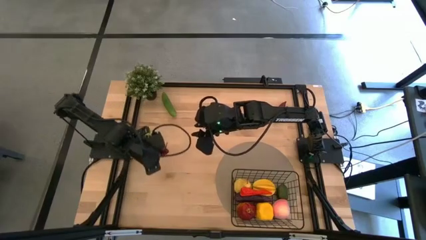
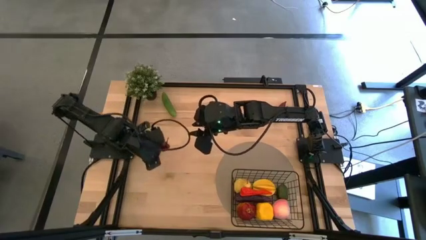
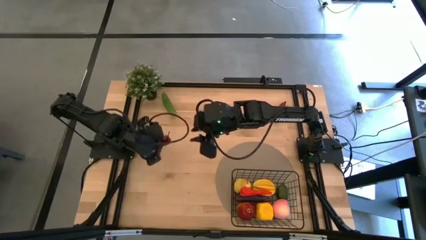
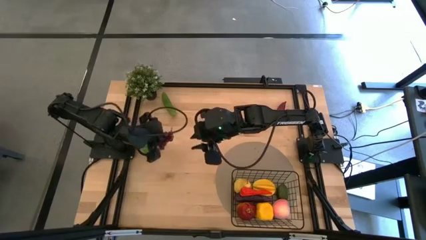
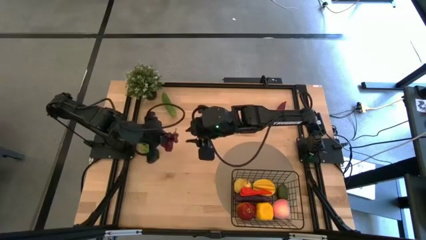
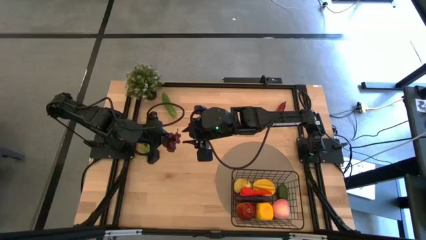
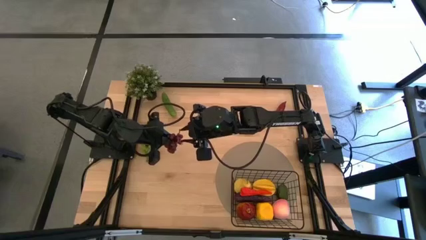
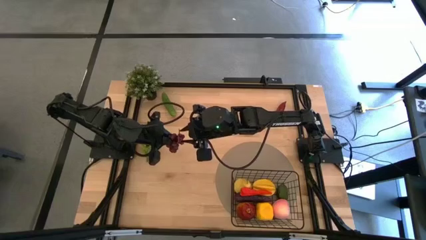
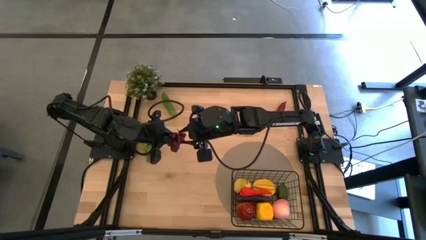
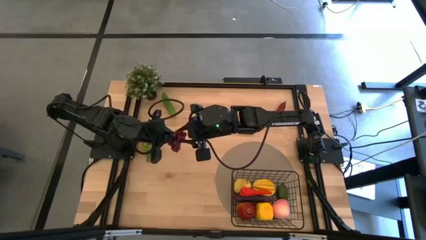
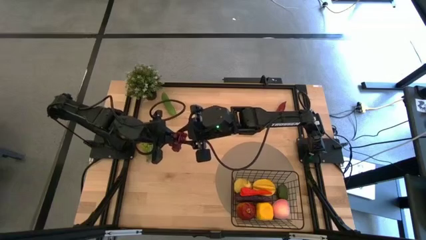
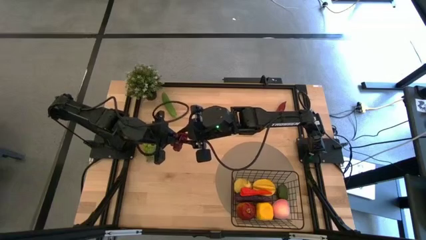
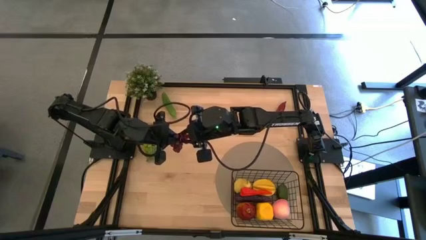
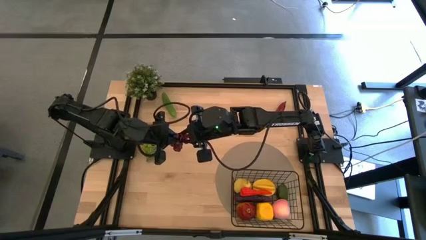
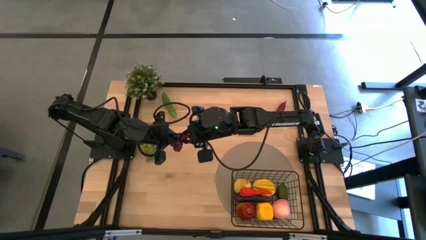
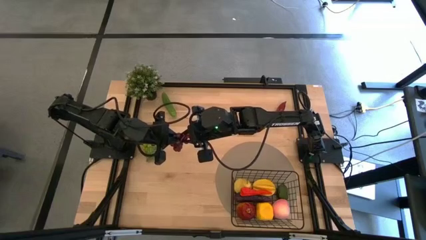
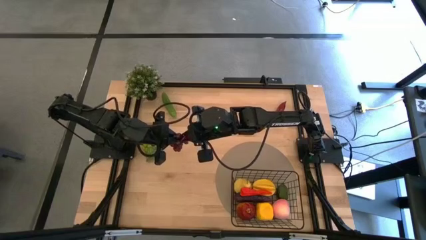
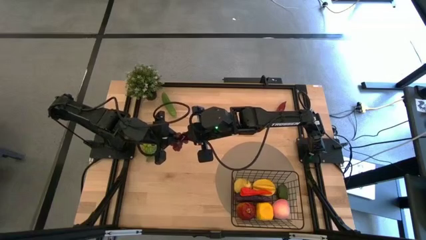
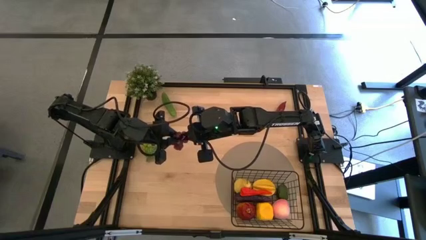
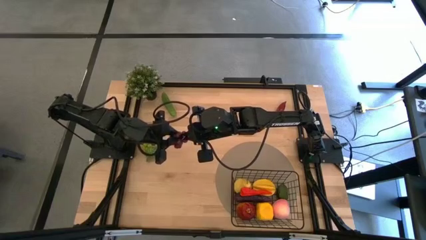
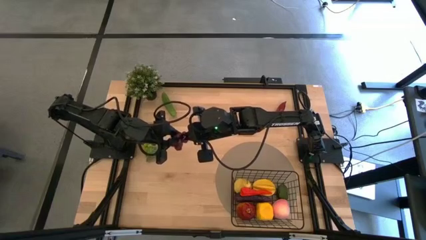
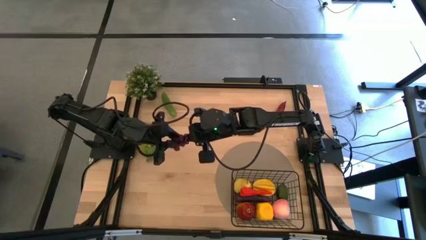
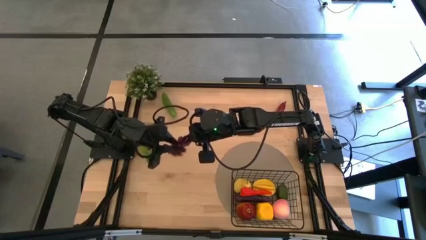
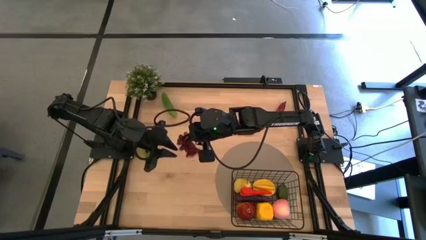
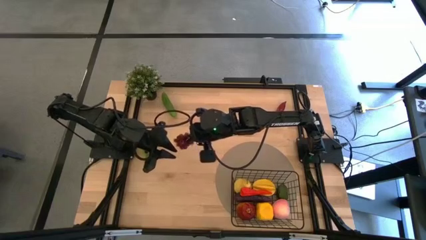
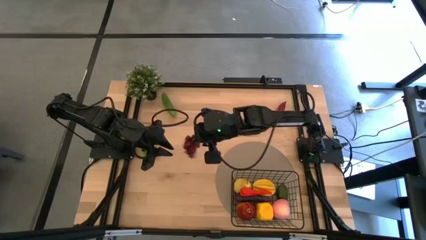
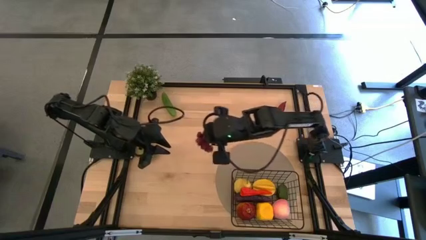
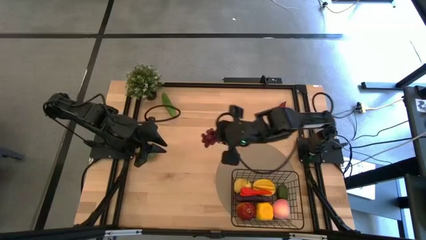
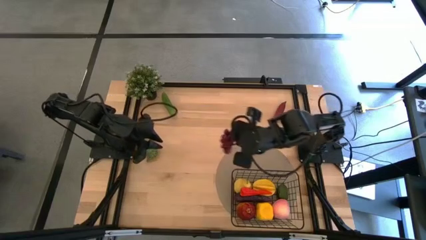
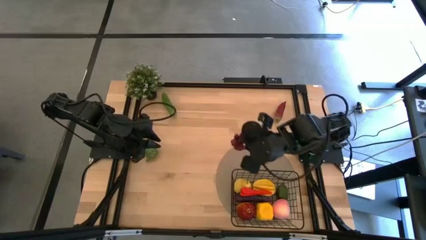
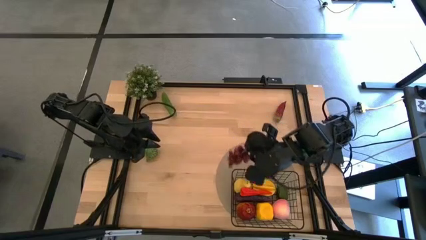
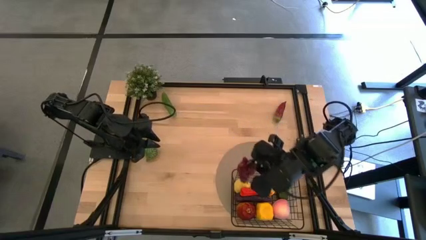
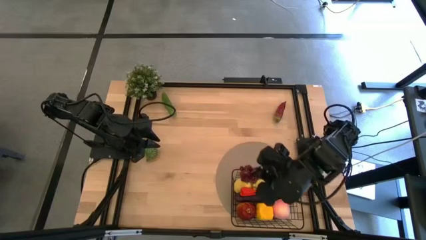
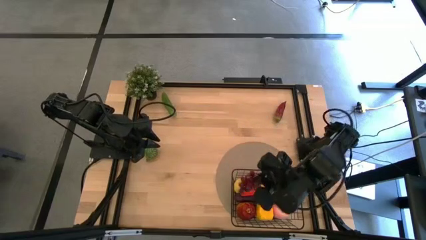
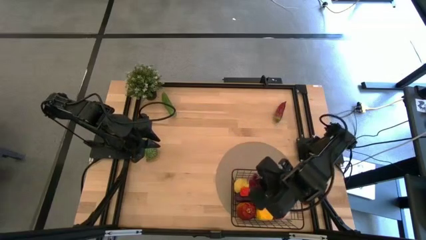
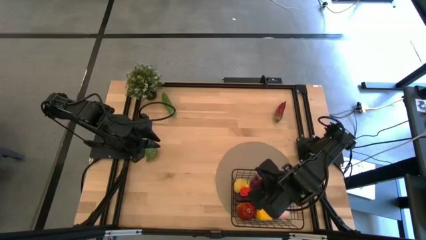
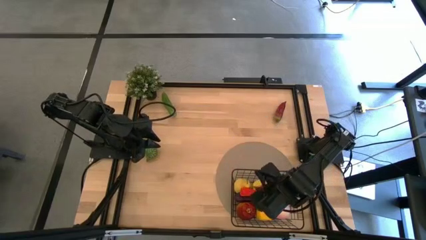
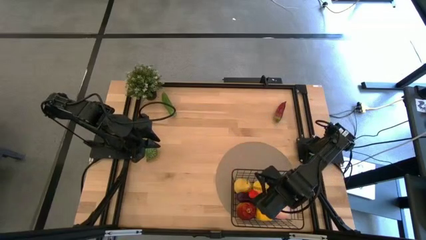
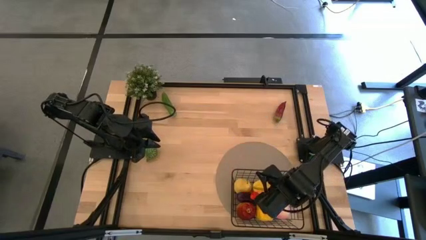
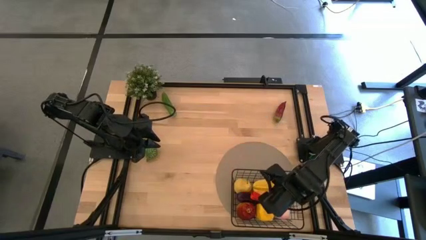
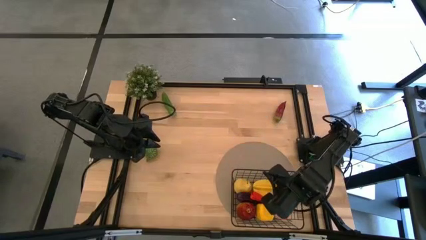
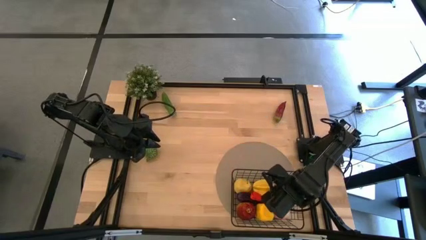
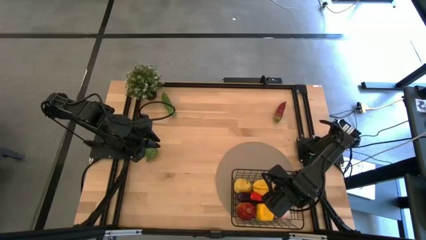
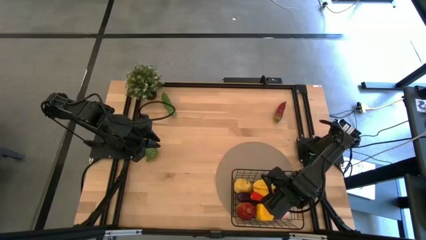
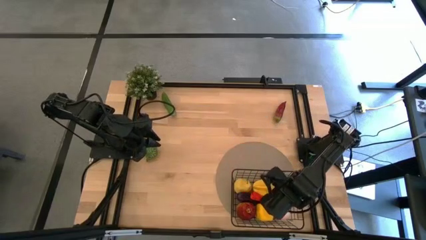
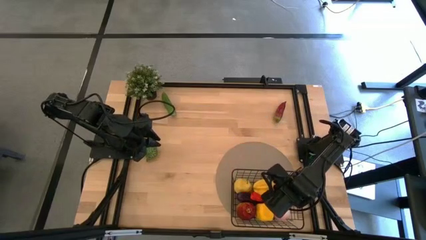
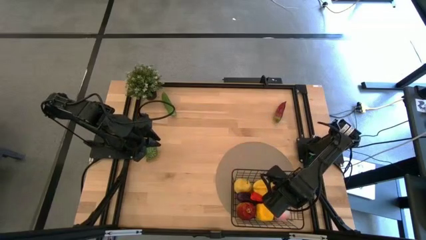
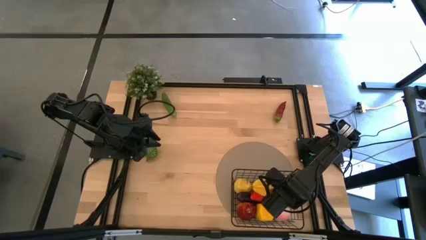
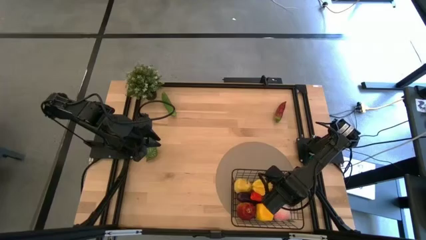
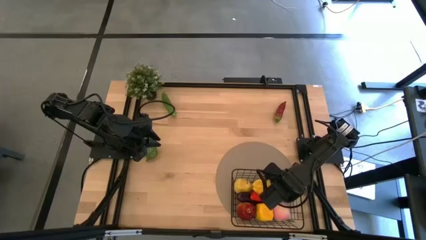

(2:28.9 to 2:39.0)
Task: Build produce basket
Put the red grapes into the wire basket

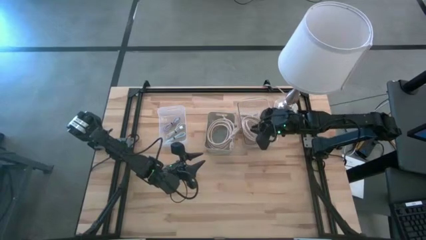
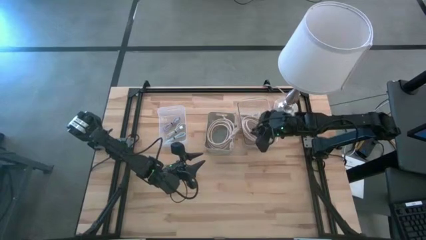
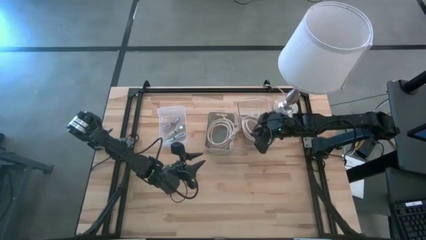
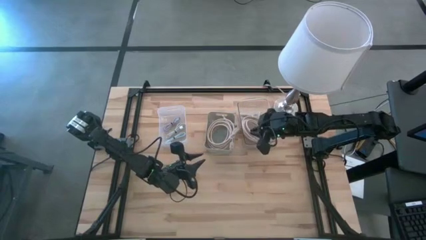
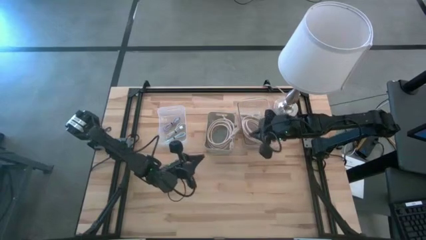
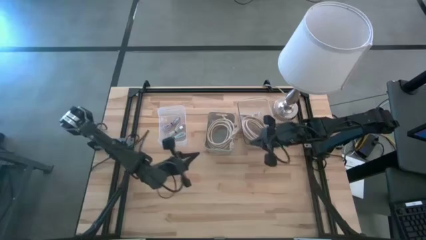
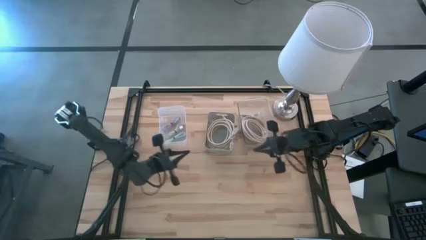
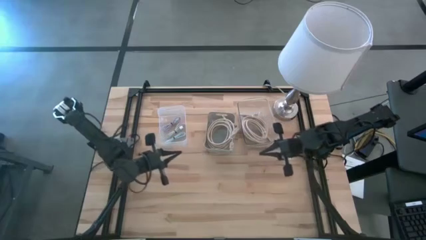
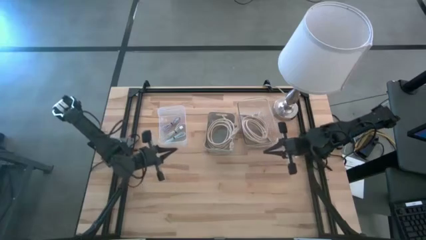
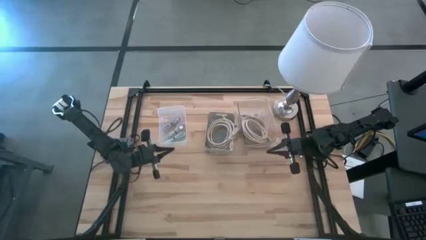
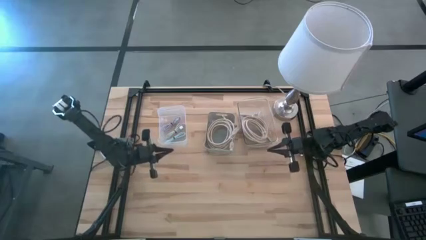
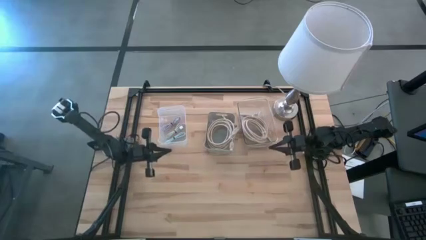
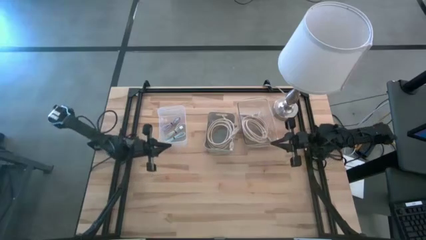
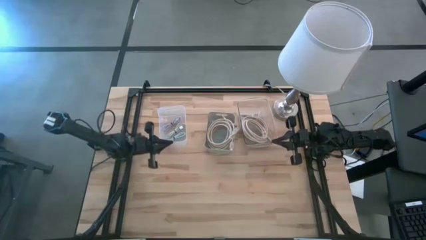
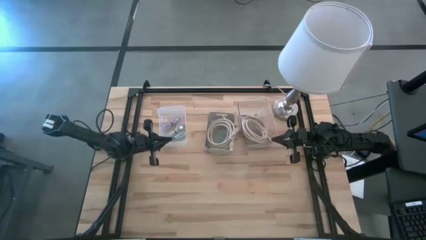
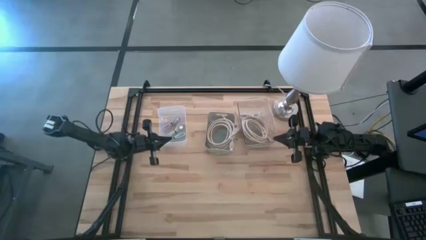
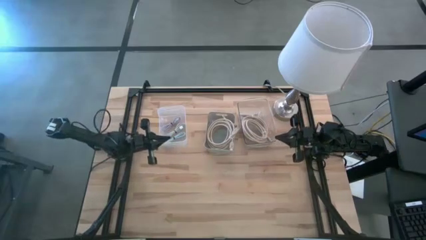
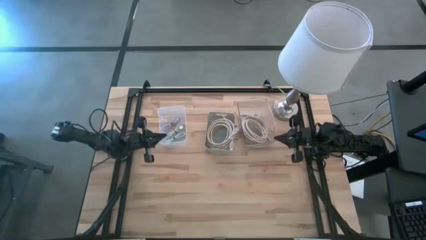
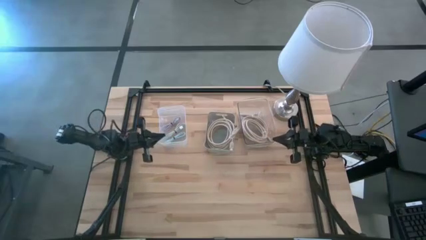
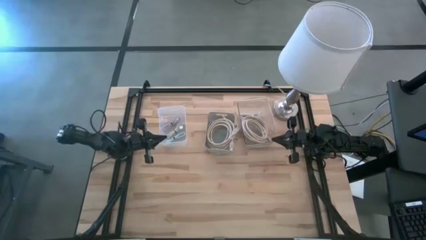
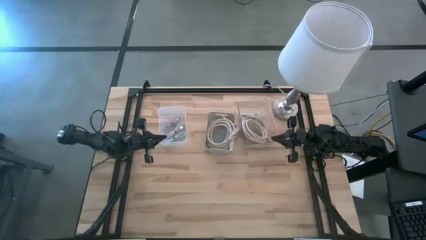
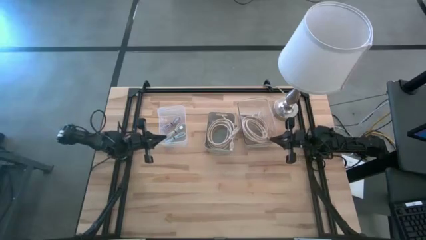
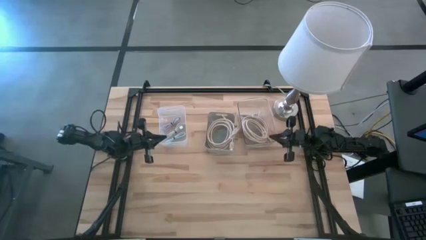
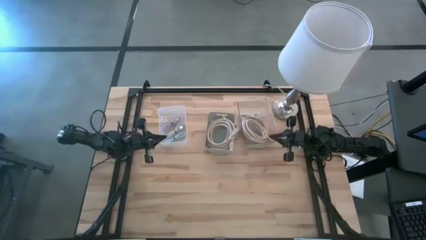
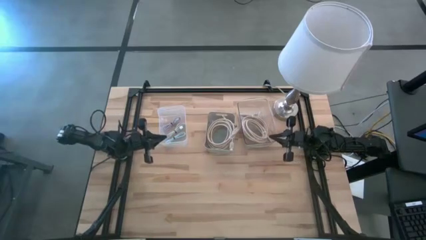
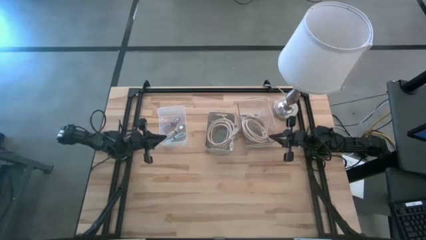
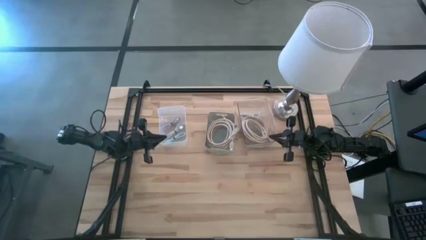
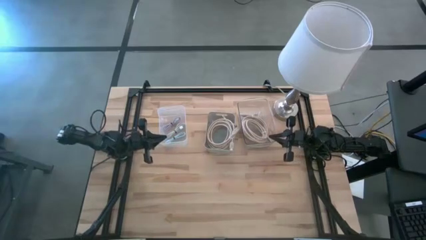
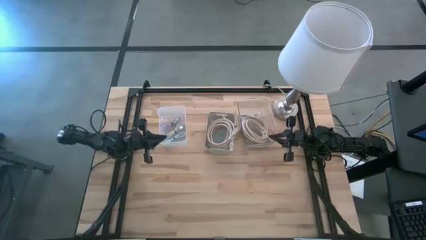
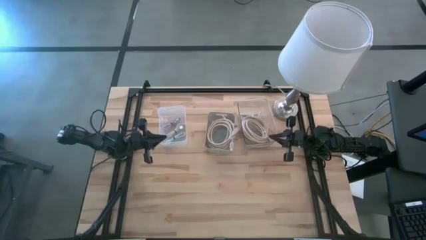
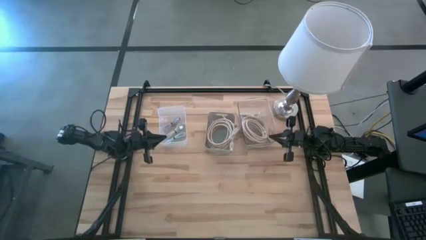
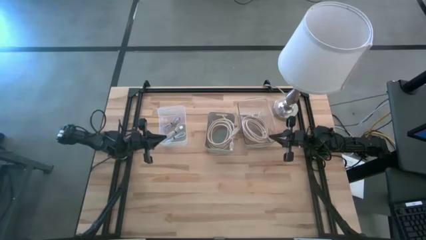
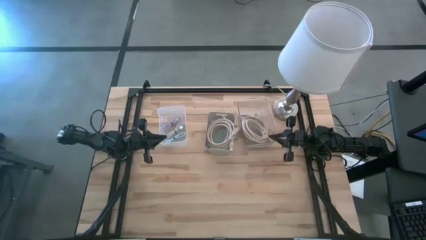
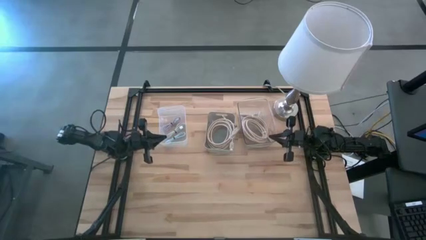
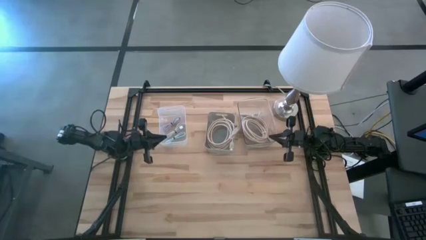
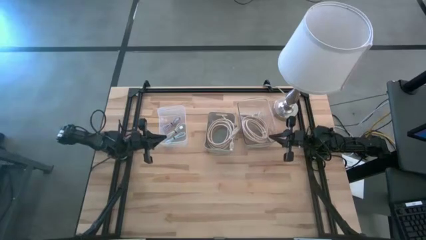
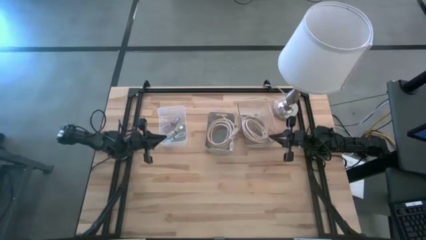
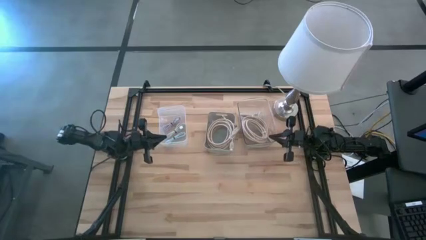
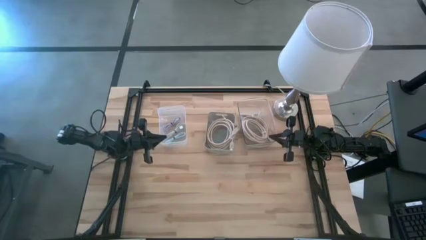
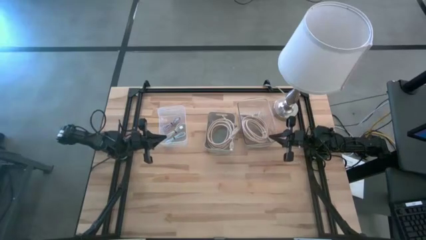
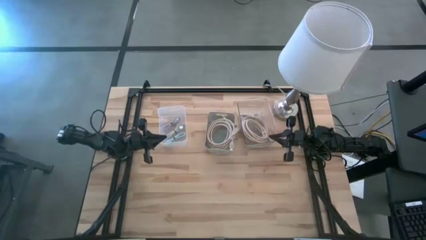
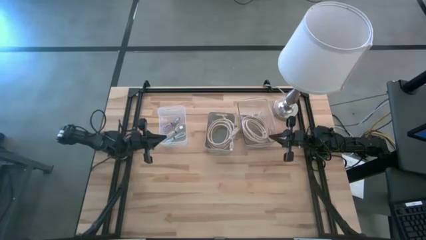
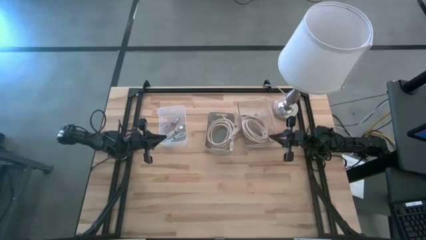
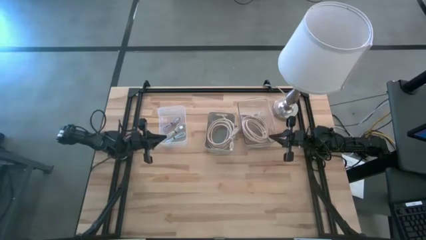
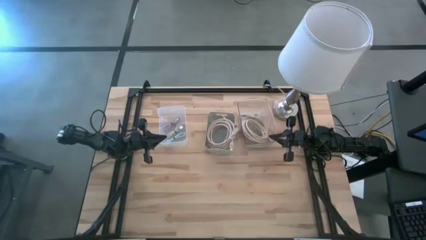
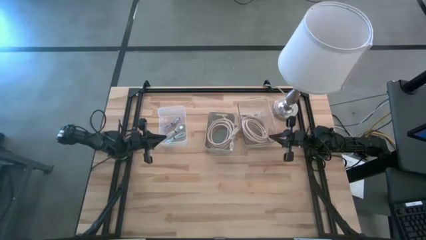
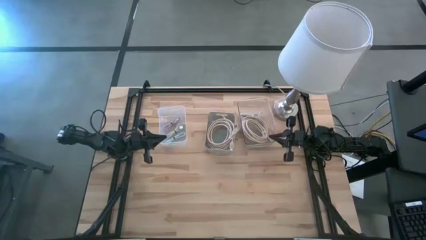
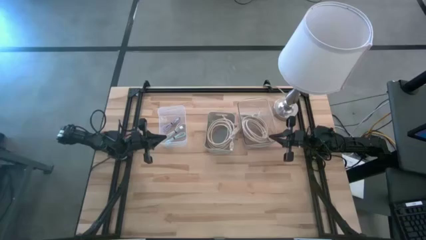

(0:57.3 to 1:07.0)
Task: Pick & Place USB Port
Return to Home Position
